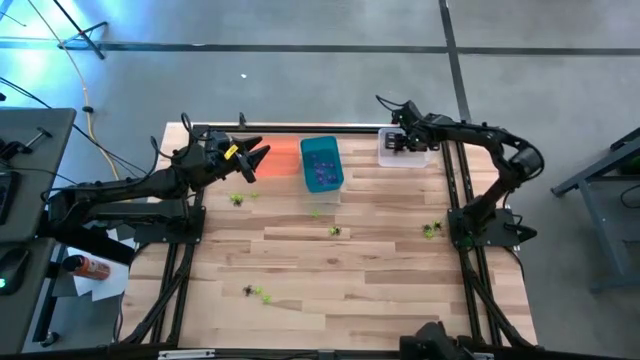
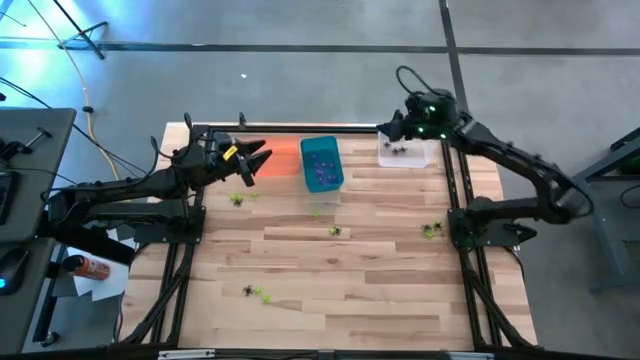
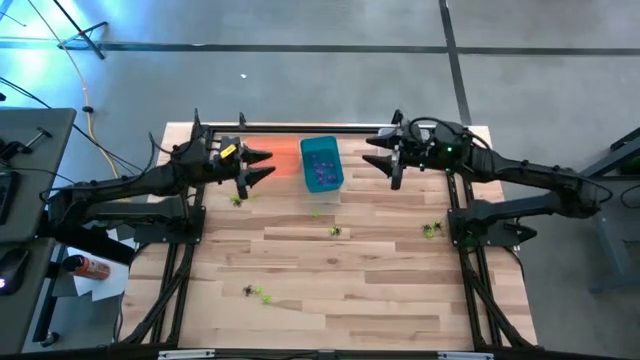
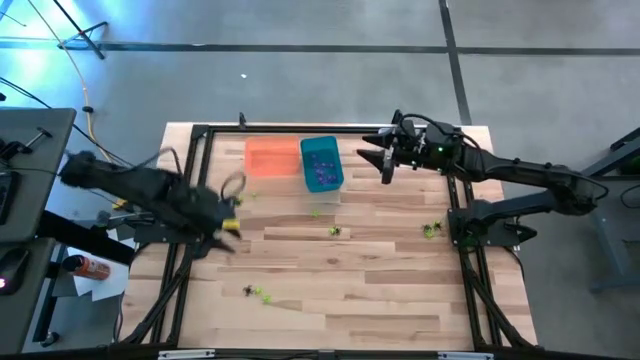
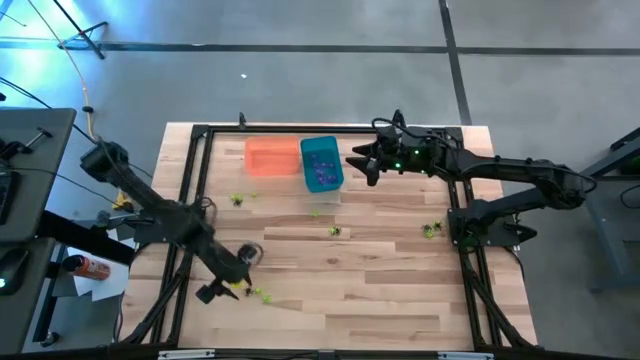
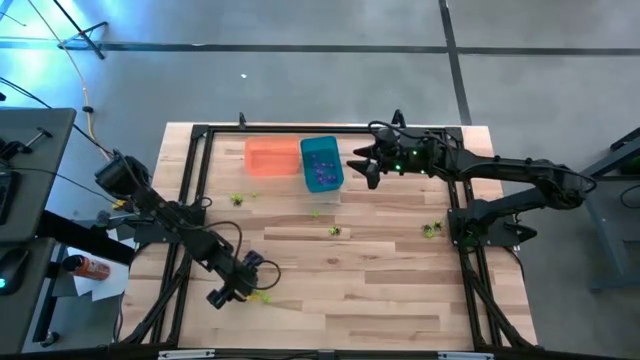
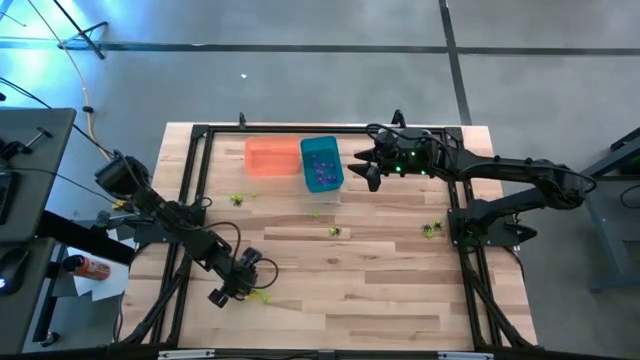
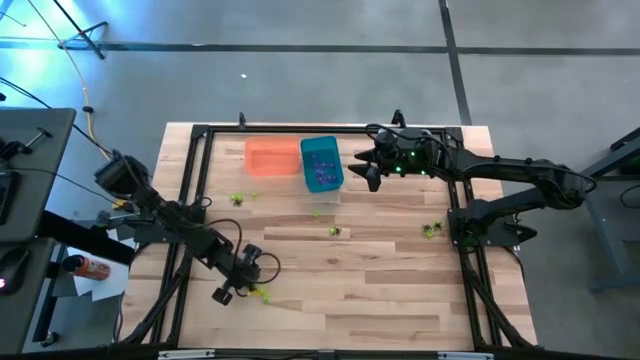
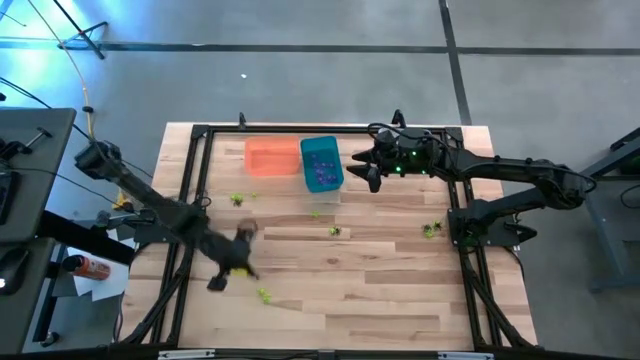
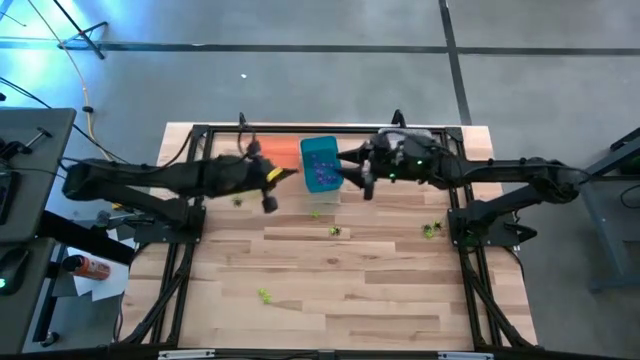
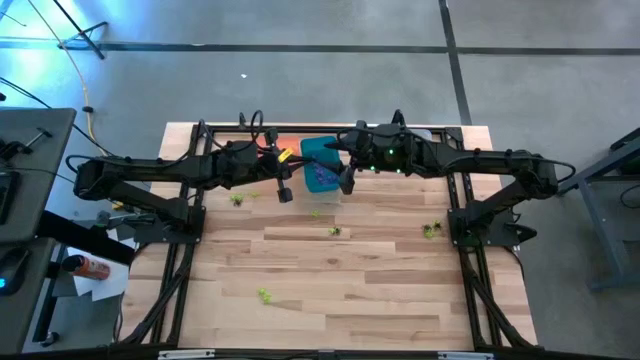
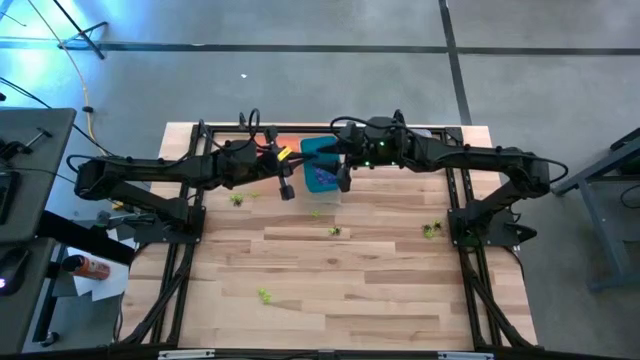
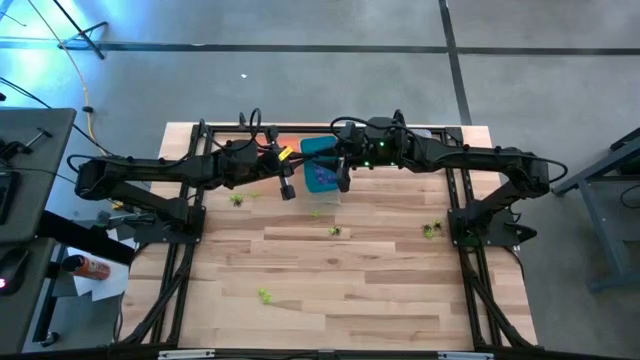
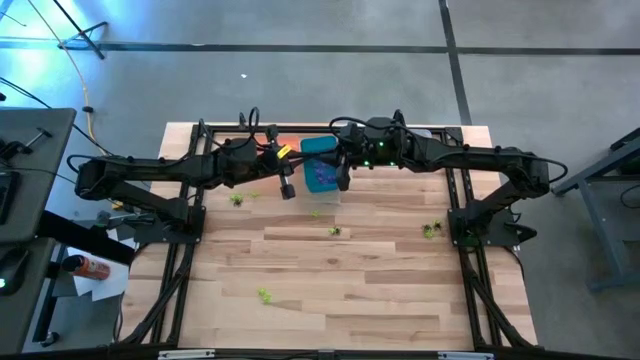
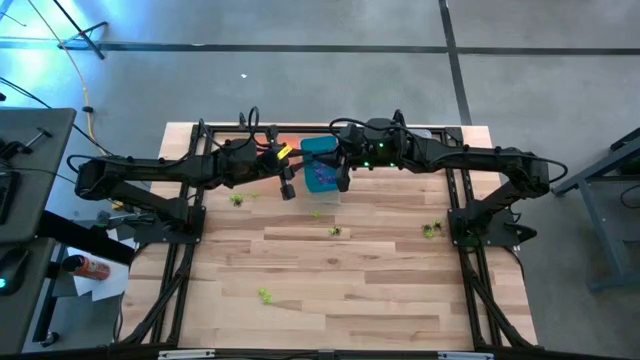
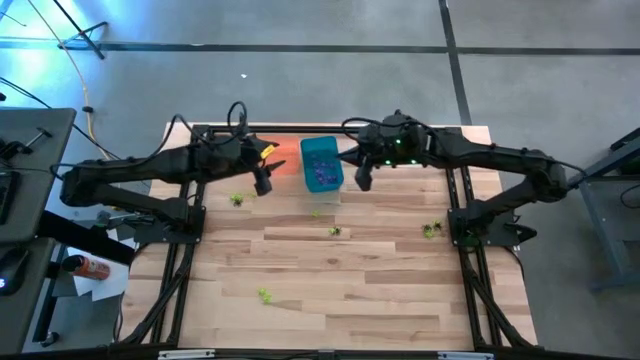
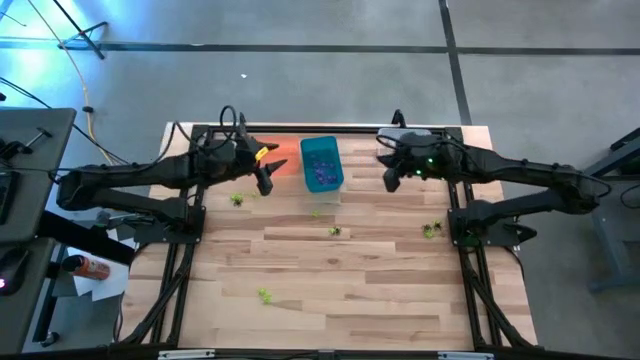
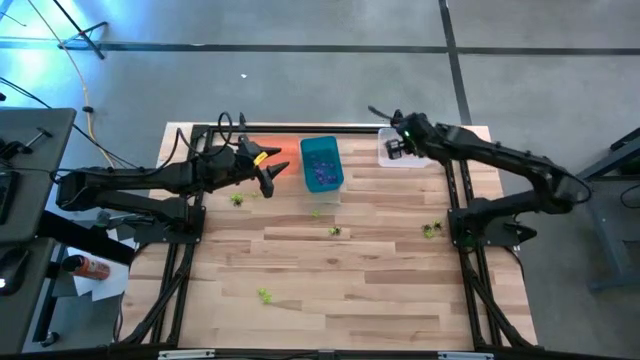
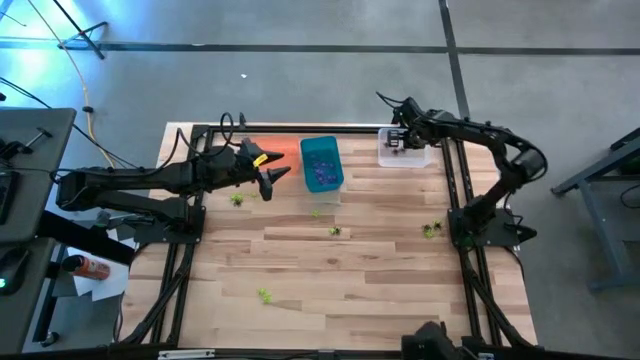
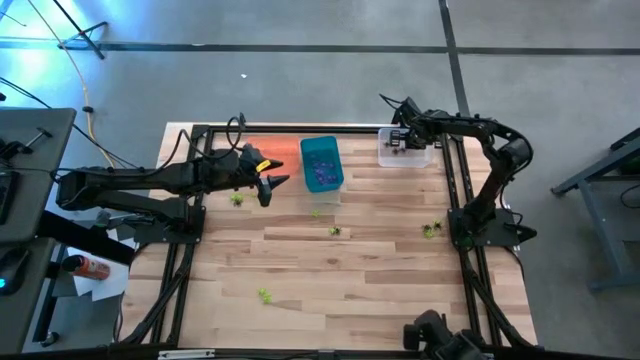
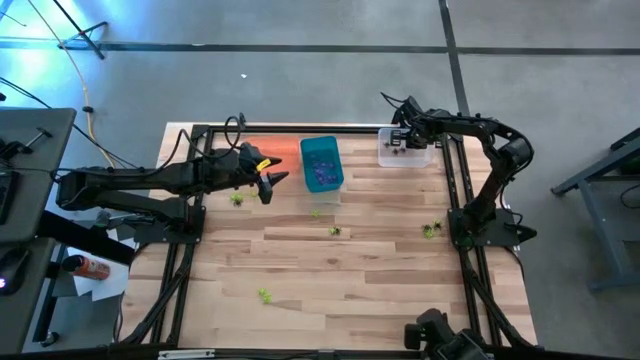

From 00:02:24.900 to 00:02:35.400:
Task: Sort Halloween decoration
Put the black spider toy into the transparent bin

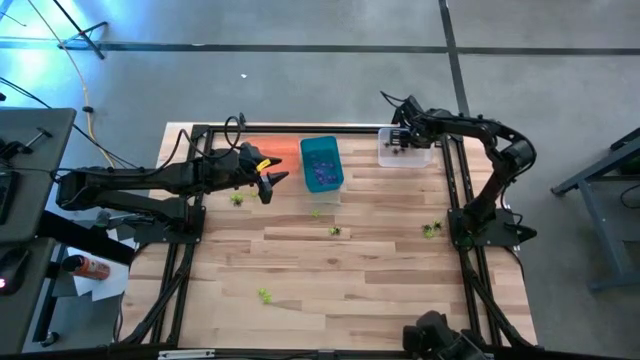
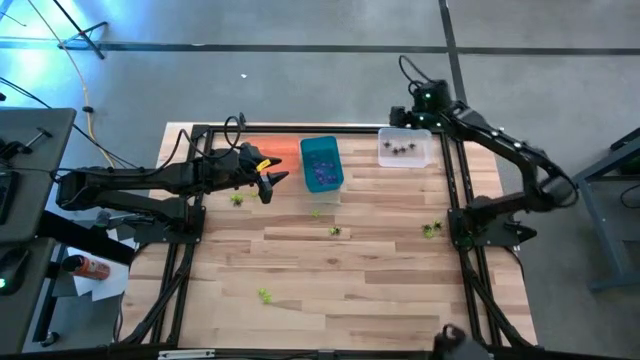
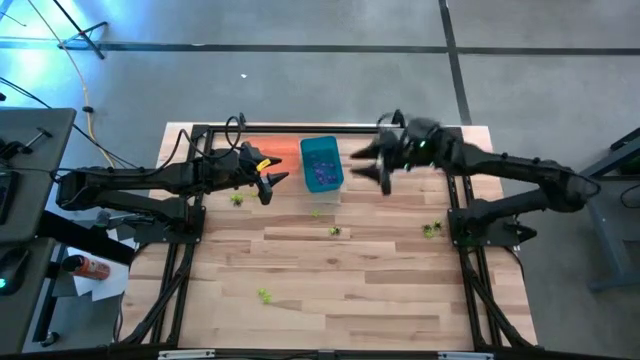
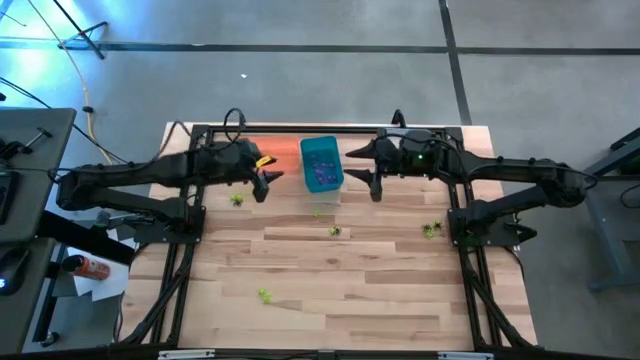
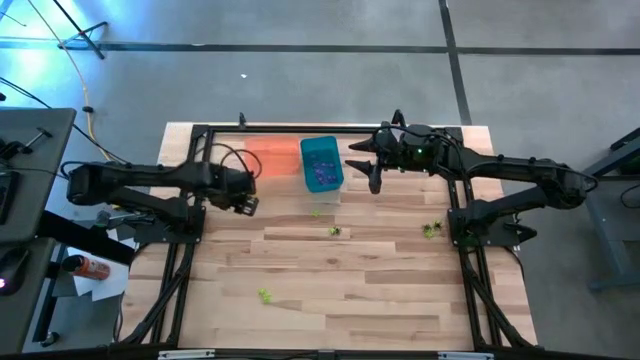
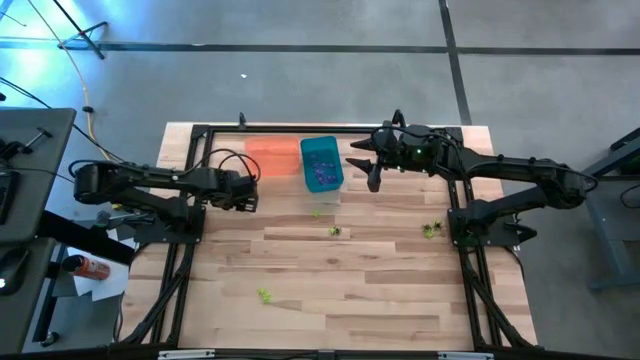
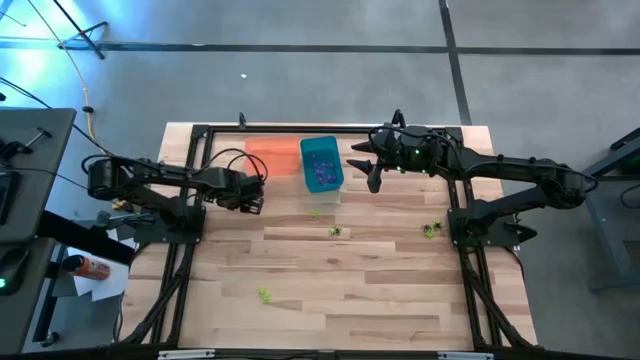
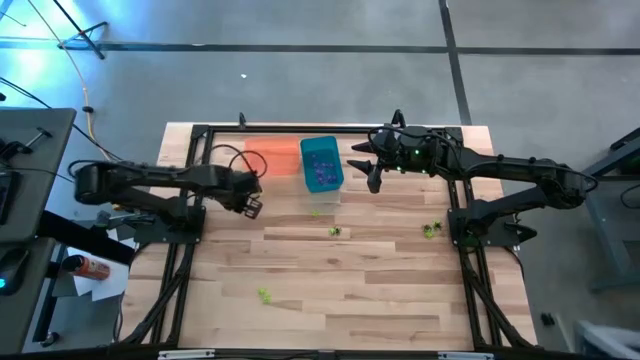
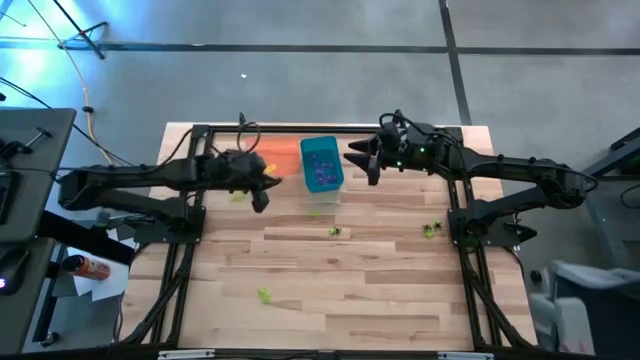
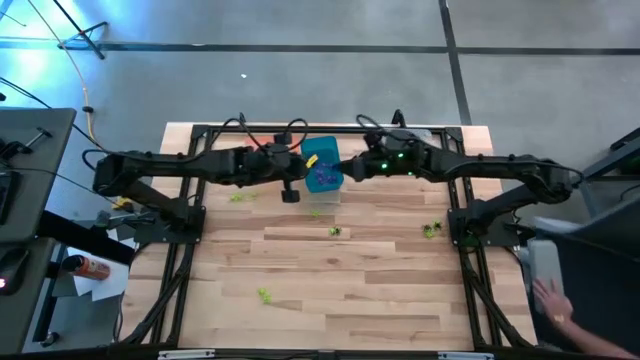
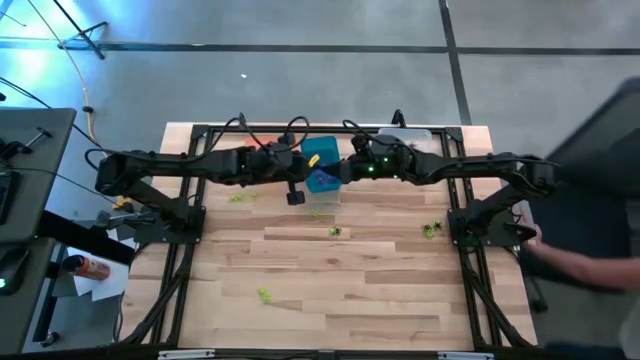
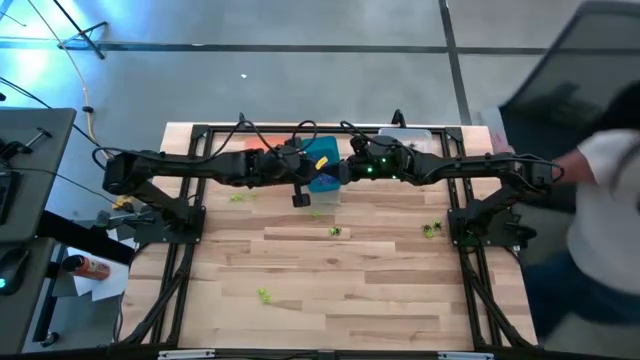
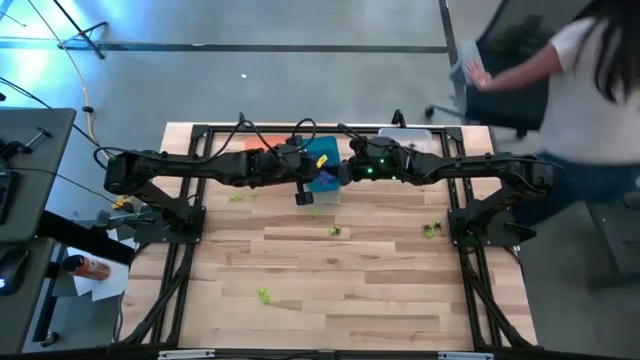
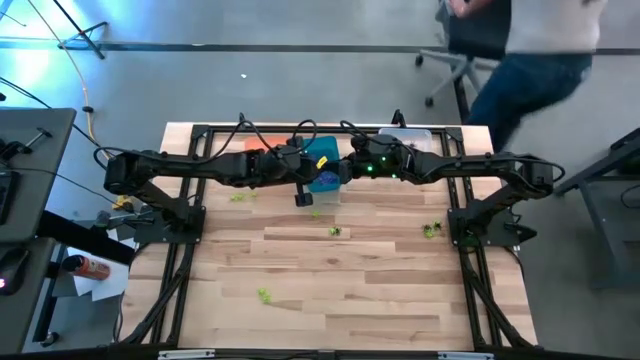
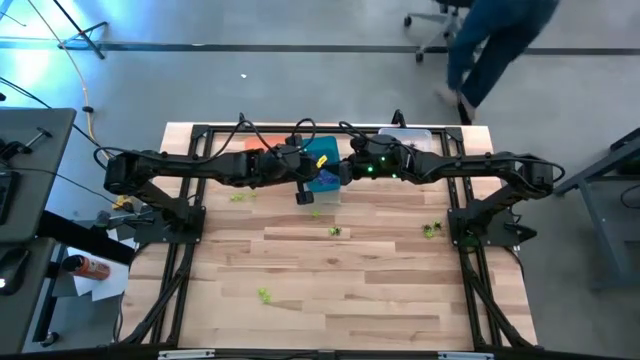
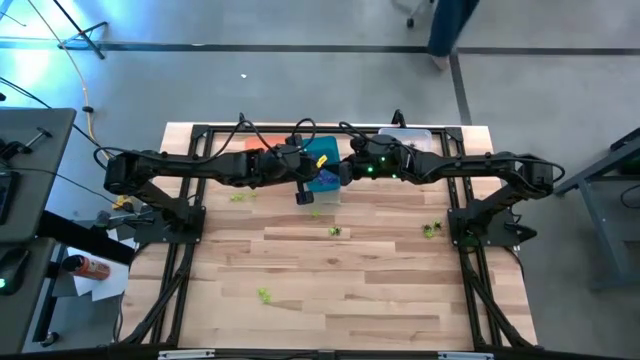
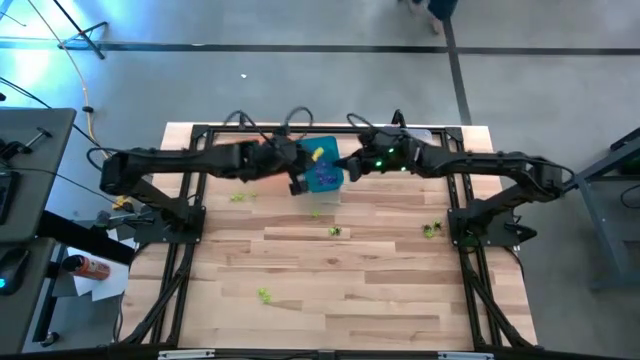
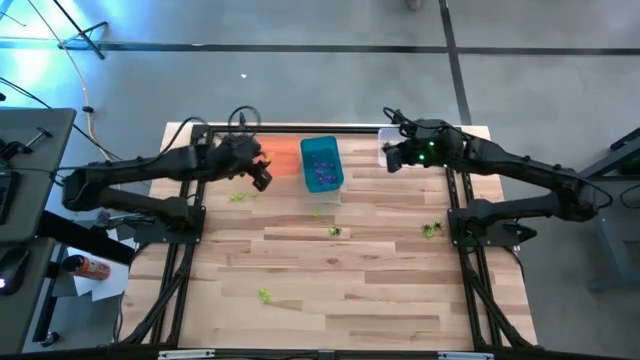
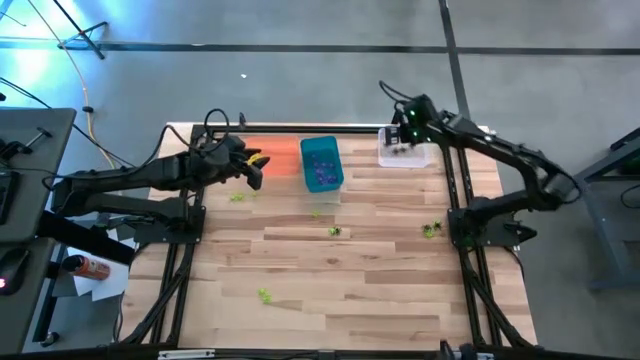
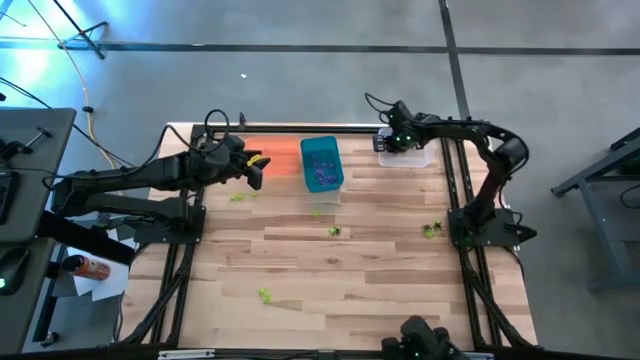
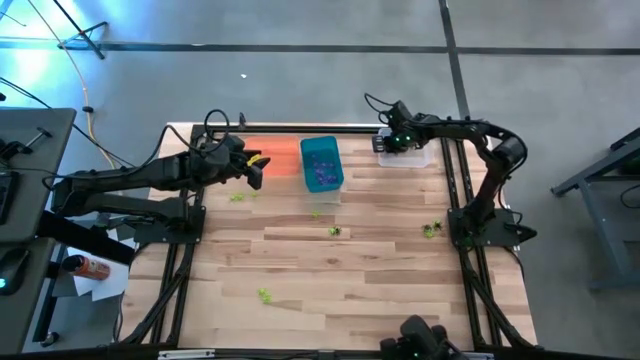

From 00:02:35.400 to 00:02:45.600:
Put the black spider toy into the transparent bin

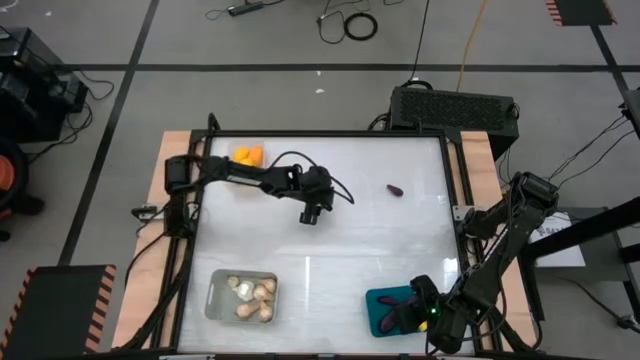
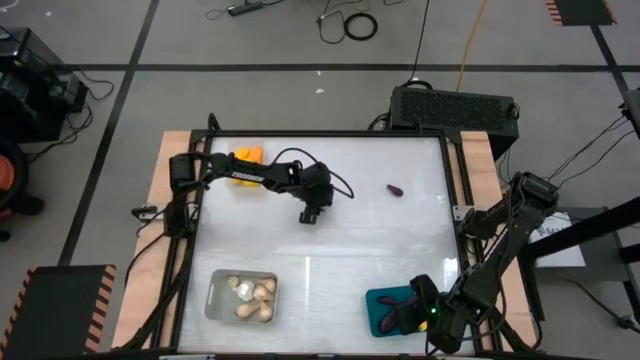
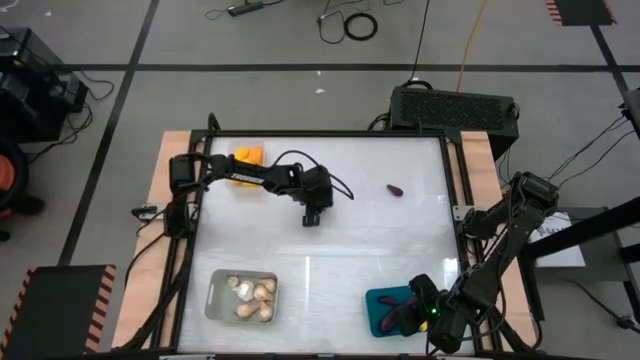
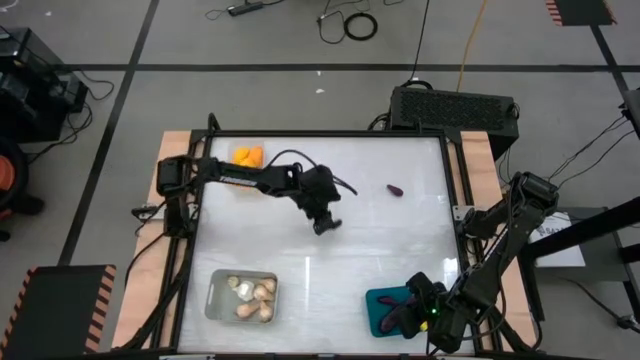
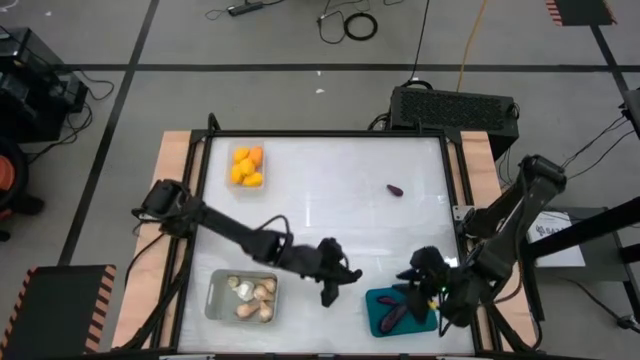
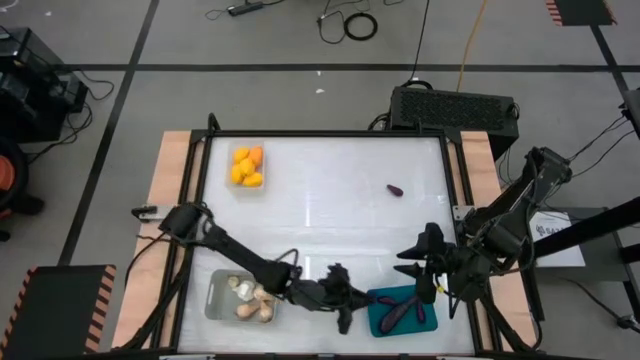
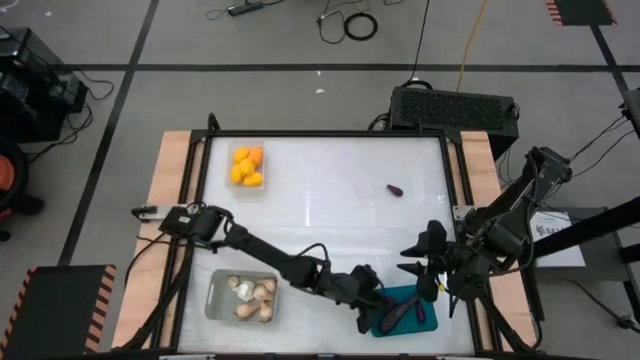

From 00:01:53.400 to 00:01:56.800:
Task: Sort produce into baskets
Put the purple eggplant into the blue bin
